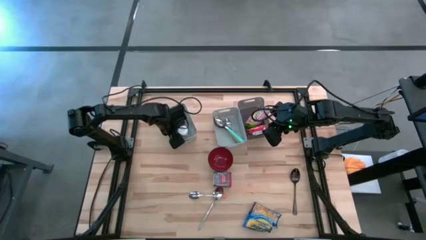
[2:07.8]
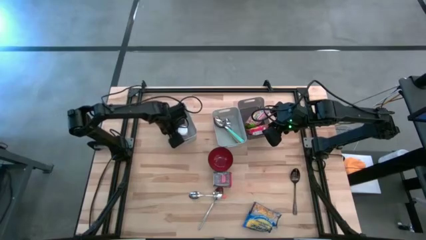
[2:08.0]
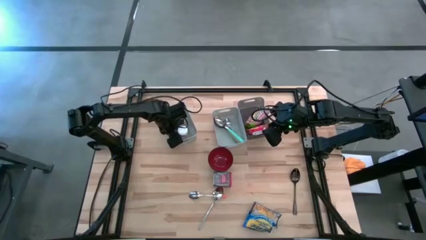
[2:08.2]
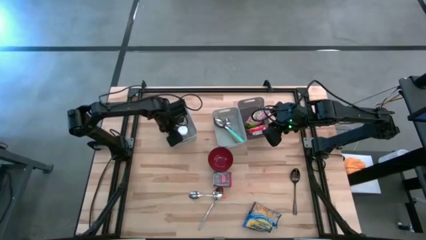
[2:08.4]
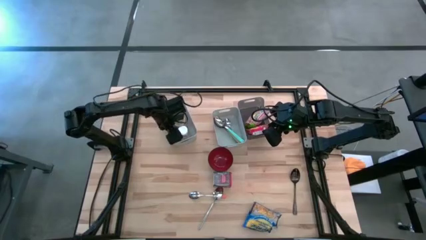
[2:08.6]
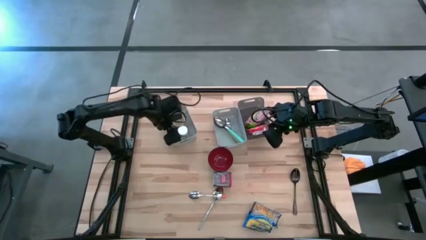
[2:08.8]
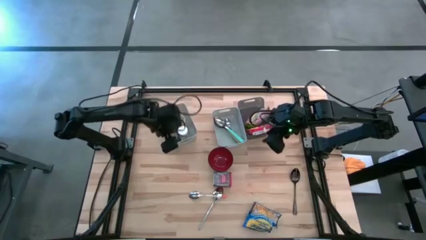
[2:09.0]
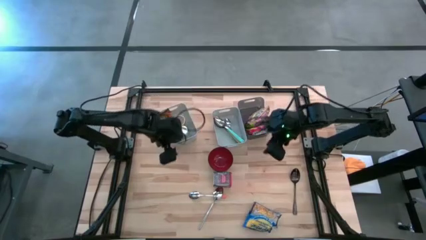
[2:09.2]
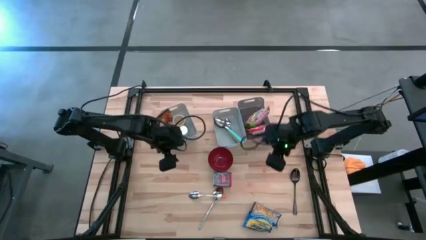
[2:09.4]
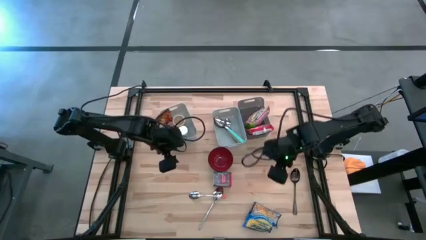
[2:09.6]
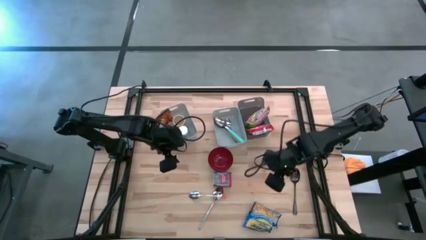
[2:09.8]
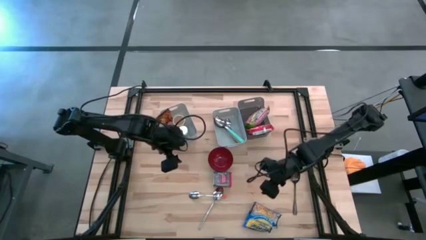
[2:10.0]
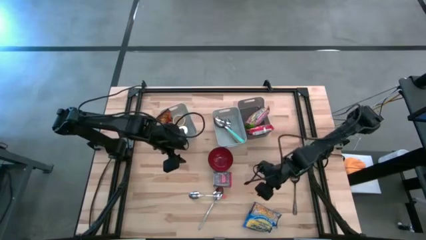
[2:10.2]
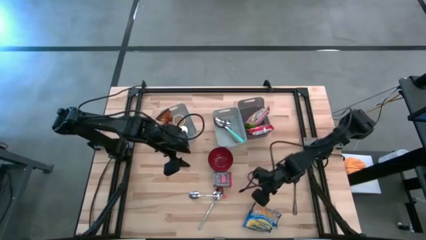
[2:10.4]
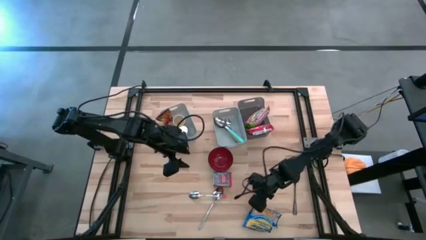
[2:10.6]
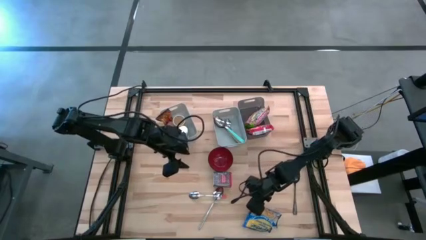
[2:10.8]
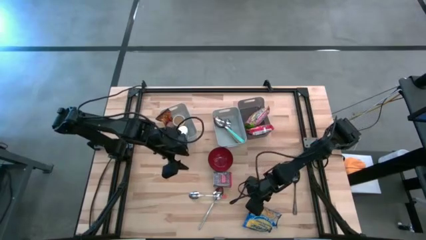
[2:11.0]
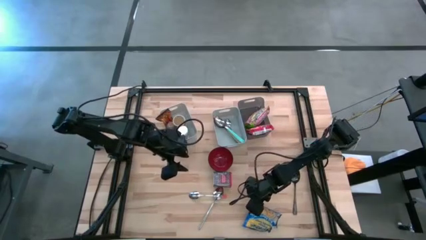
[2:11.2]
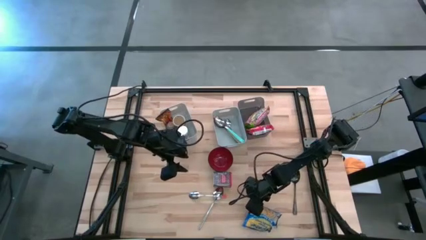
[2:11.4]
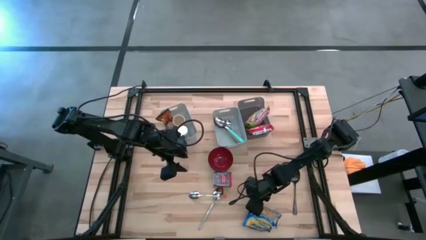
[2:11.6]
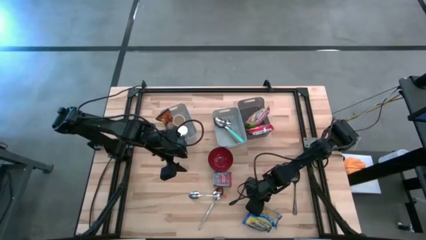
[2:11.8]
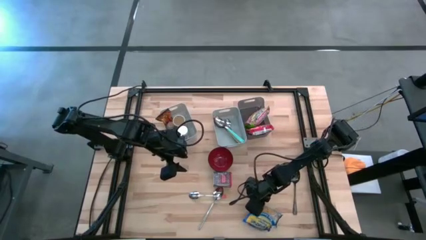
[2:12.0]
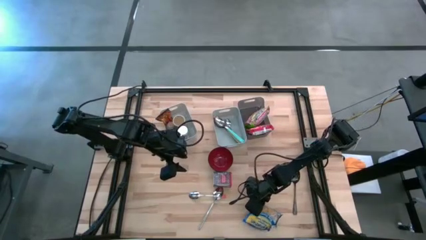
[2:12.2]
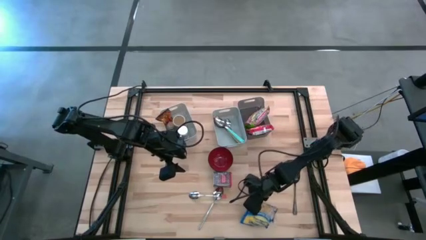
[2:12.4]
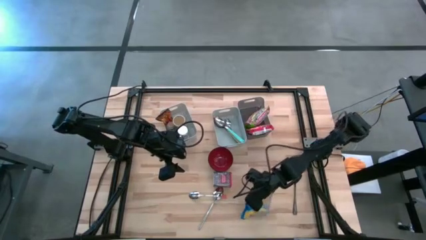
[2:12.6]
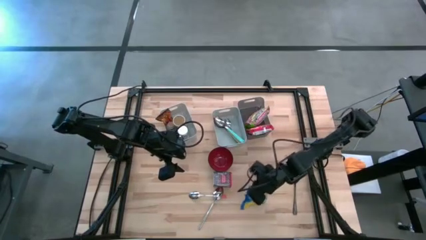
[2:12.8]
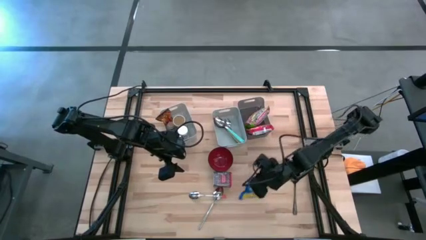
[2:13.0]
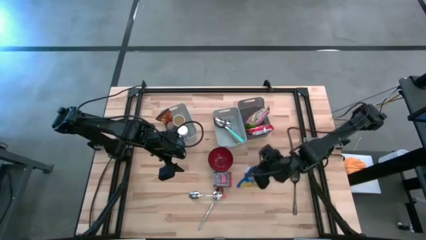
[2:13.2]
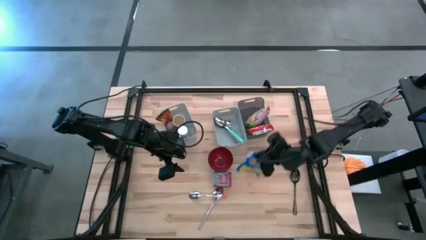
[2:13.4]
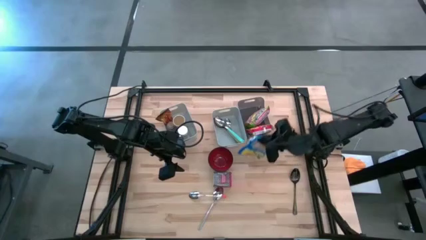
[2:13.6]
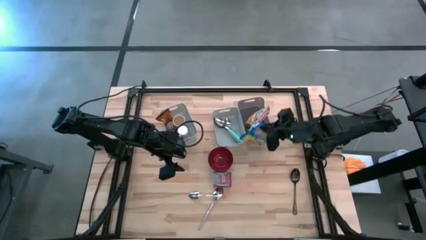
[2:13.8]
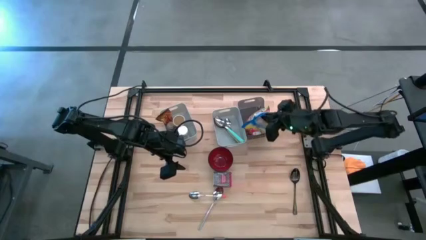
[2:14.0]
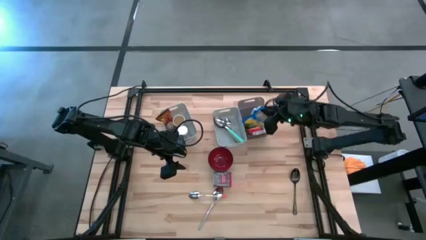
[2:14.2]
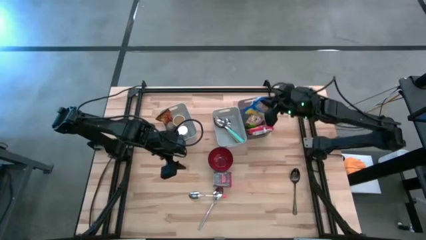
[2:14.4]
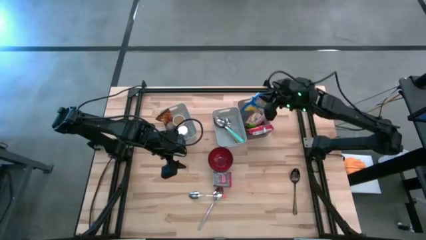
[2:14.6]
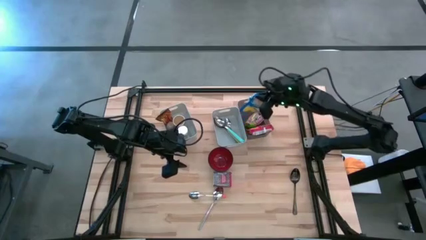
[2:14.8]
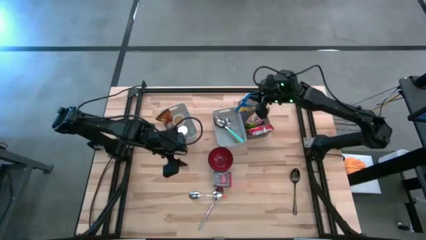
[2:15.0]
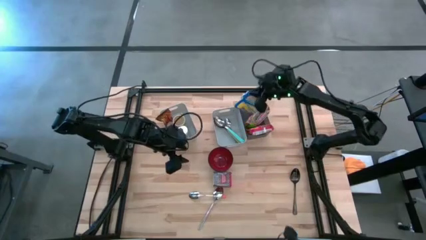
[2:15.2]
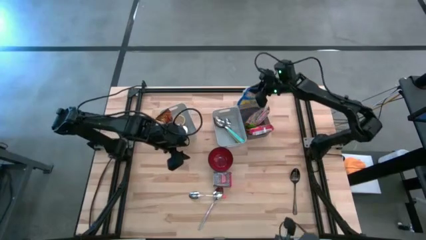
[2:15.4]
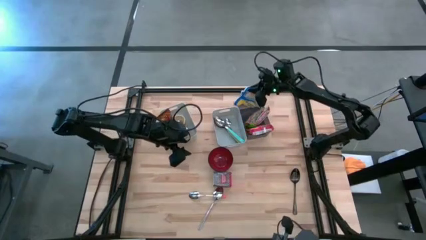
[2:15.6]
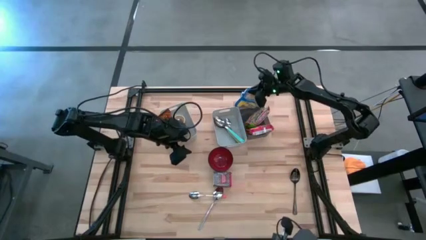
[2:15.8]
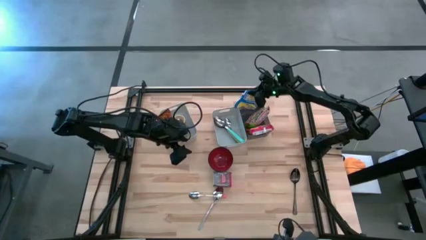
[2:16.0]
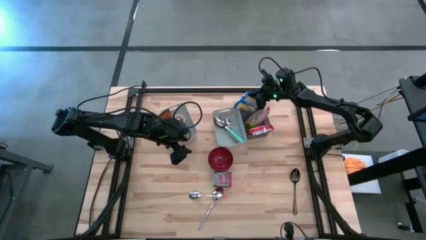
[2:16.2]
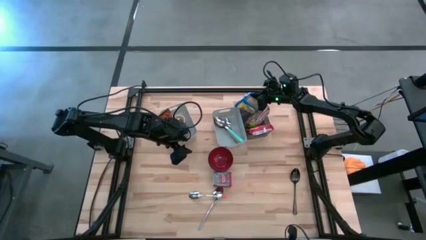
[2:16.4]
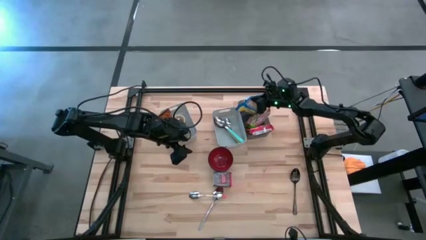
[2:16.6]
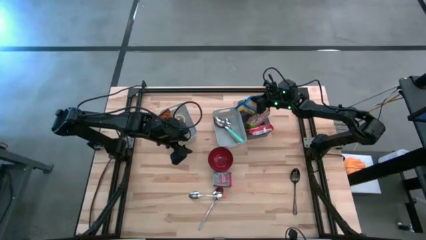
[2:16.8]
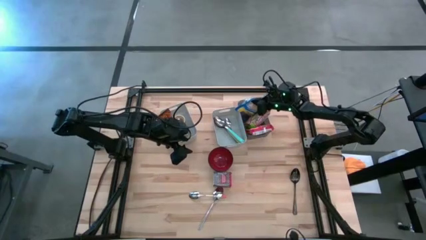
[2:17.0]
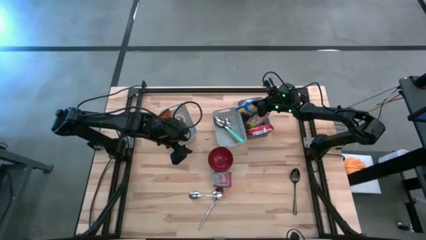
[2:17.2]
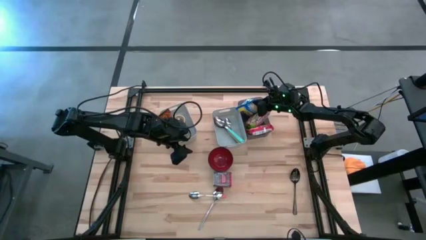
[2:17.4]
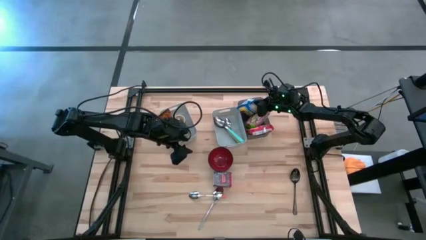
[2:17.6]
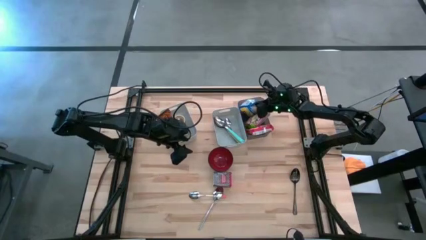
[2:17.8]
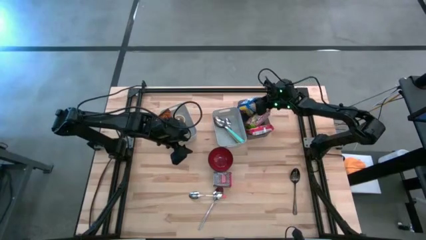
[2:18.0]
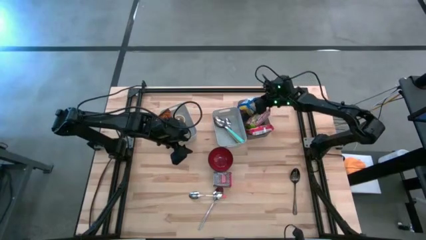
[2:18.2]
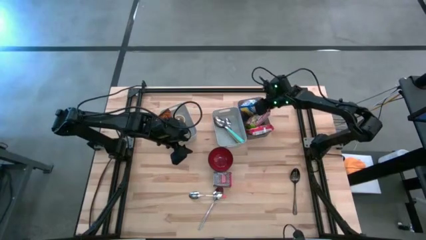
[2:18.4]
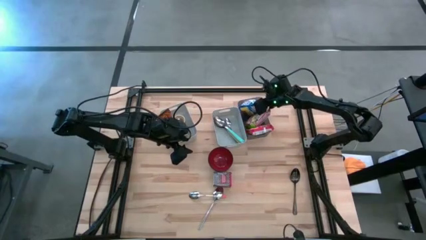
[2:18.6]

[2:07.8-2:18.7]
Put the blue noodle pack into the black bin

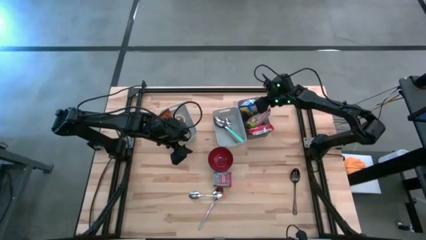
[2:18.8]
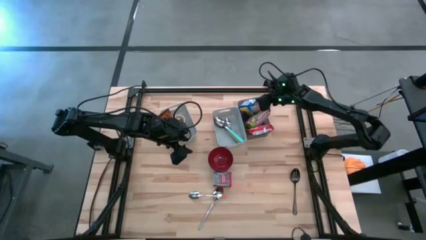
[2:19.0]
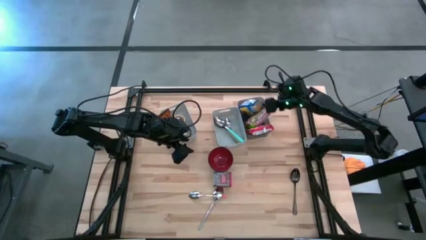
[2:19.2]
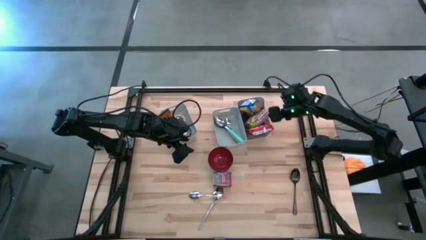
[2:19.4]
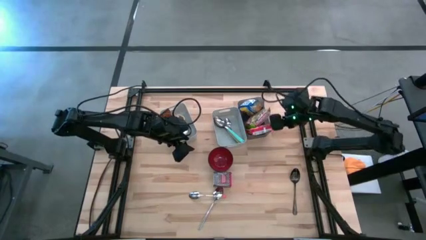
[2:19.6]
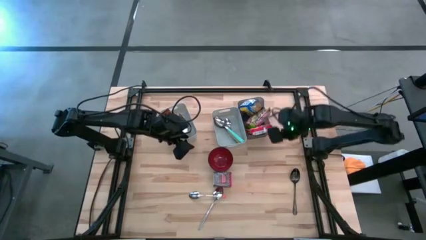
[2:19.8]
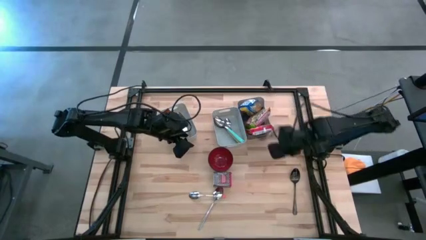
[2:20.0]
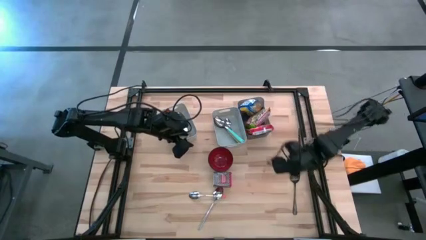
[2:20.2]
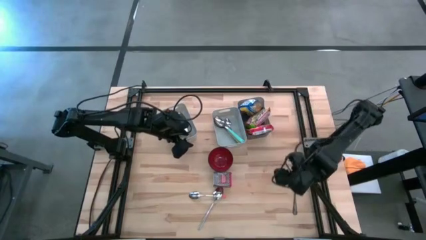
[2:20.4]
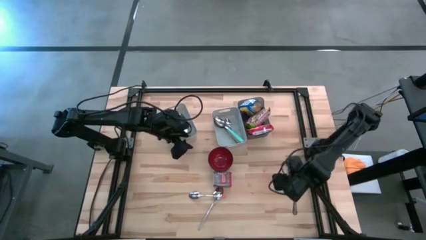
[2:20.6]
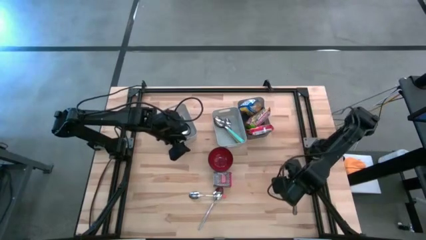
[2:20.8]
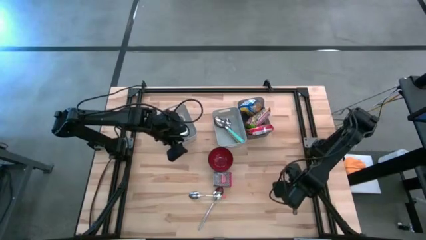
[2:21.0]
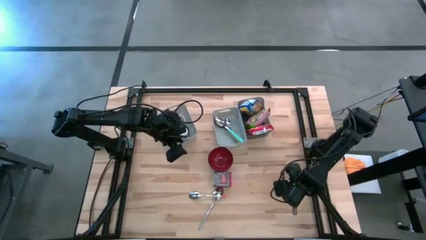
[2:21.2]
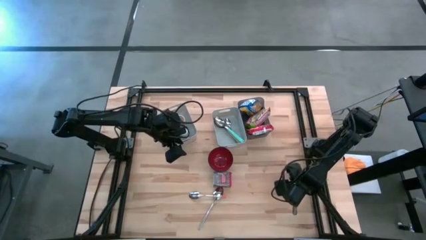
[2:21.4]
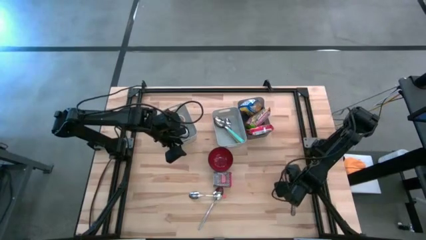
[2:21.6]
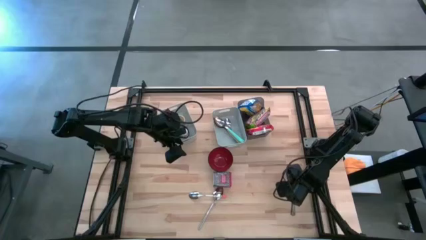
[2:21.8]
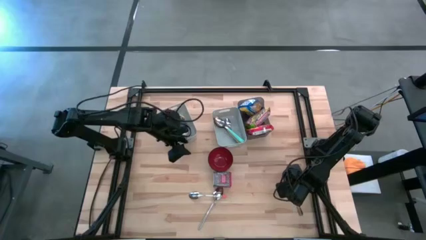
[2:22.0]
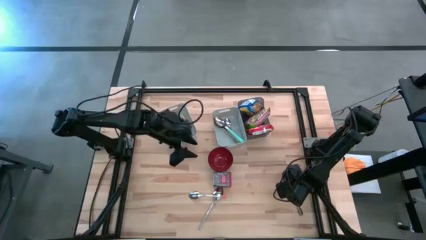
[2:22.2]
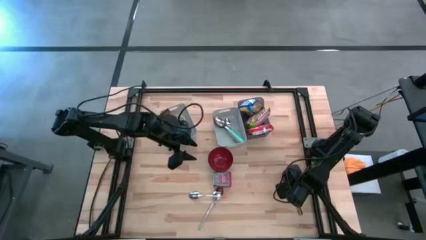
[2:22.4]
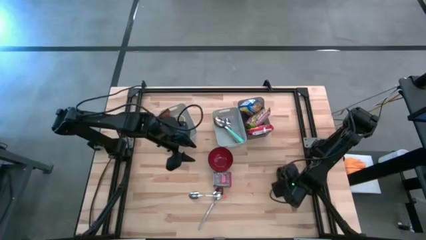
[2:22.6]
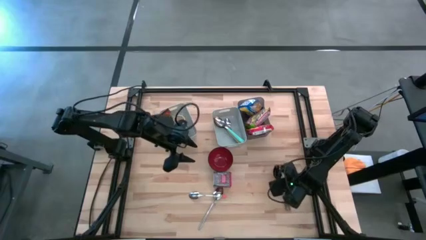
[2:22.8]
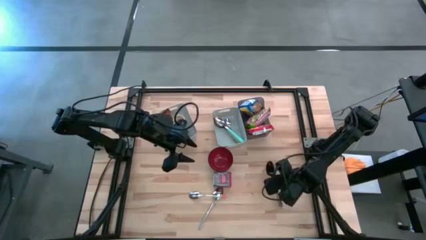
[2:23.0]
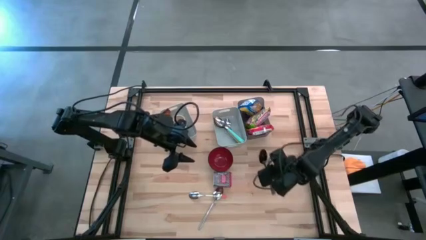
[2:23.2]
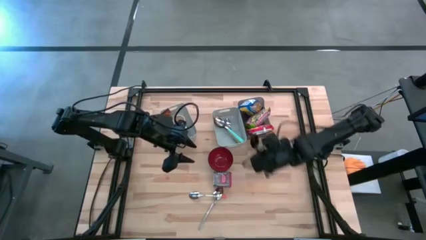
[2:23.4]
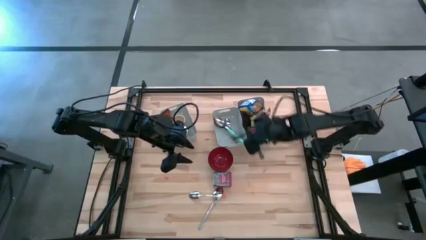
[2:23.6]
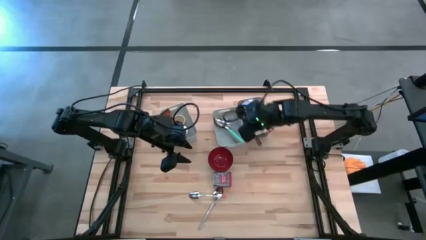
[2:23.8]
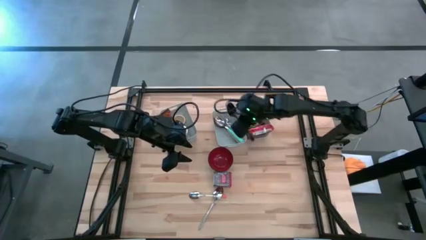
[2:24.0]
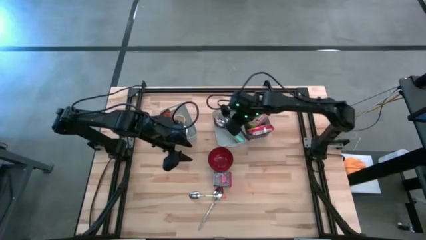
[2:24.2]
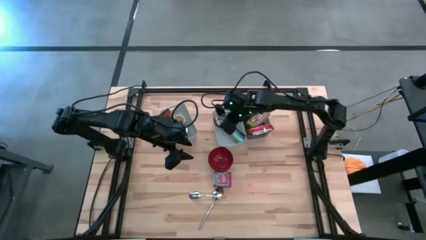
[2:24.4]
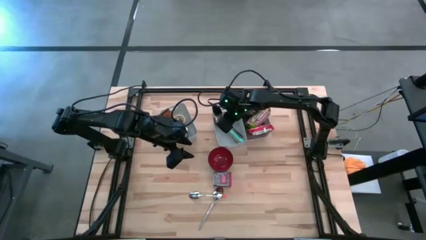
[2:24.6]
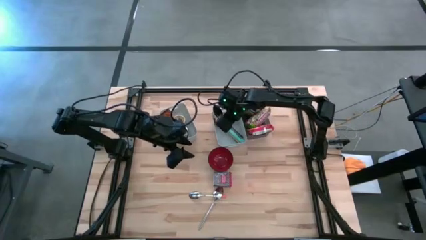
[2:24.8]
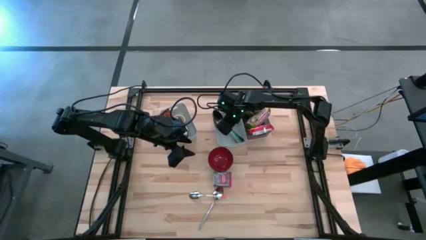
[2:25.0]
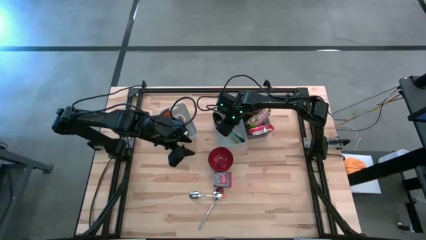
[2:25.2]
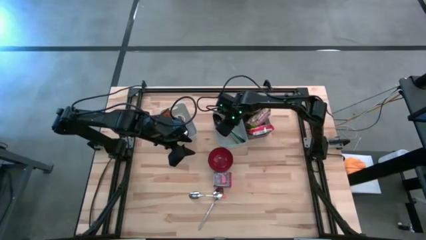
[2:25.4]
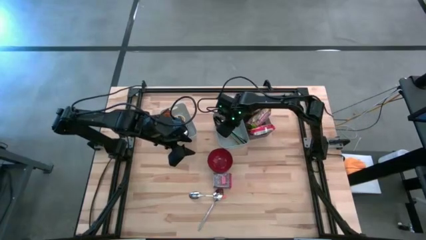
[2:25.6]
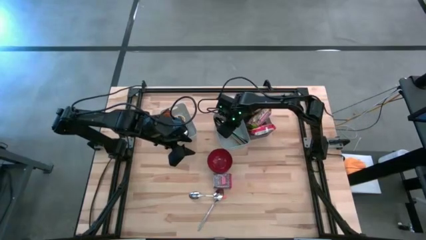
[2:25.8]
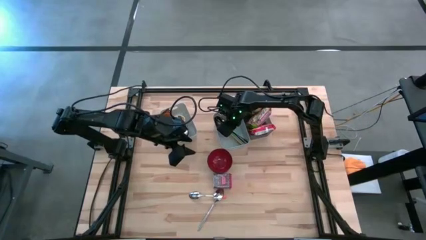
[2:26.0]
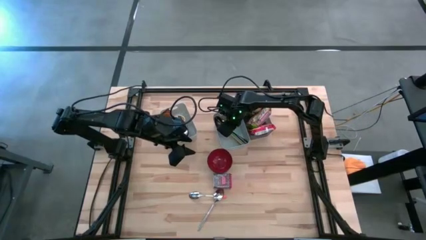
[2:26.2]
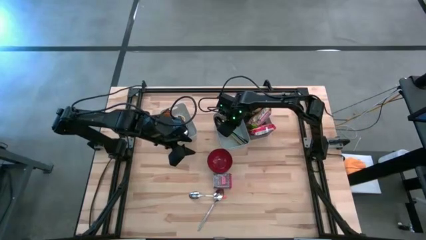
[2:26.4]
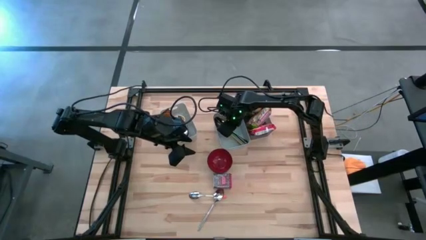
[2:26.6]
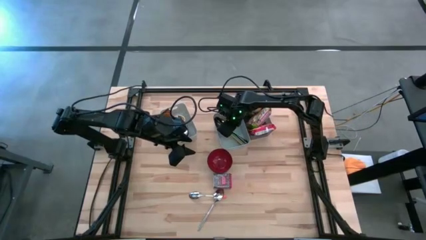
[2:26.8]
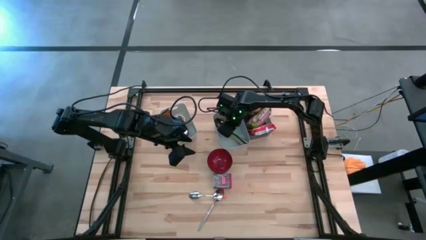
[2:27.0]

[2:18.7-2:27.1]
Put the black spoon into the right white bin
